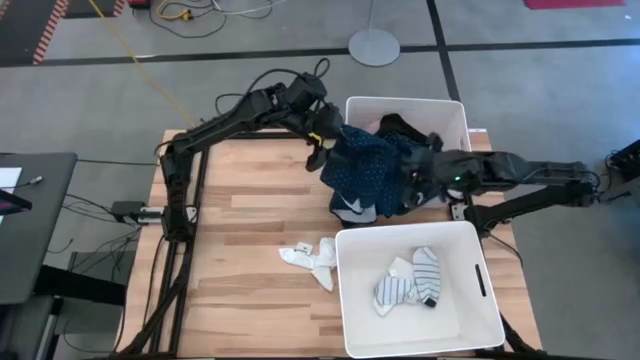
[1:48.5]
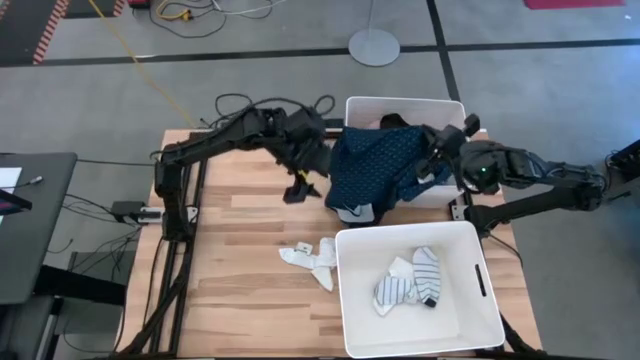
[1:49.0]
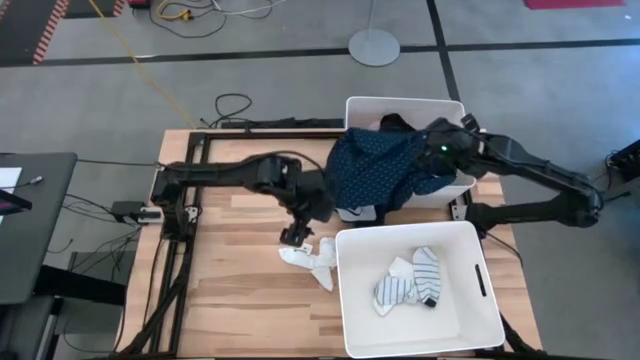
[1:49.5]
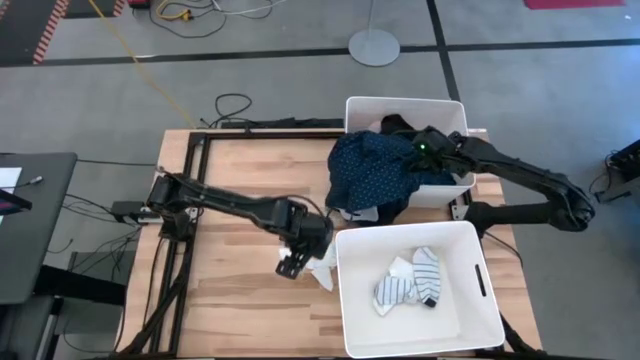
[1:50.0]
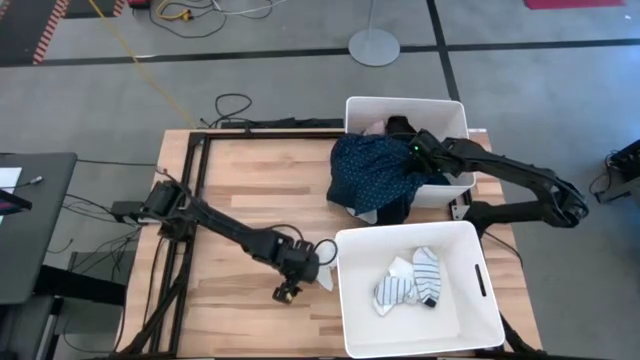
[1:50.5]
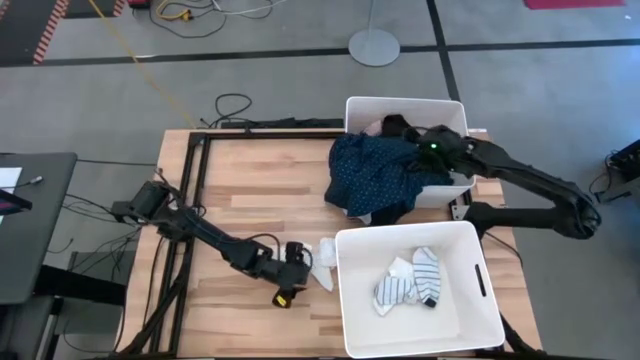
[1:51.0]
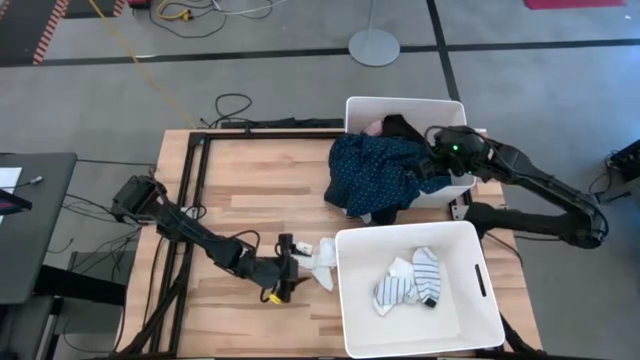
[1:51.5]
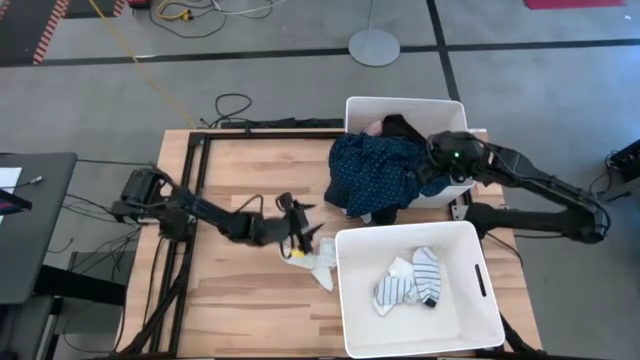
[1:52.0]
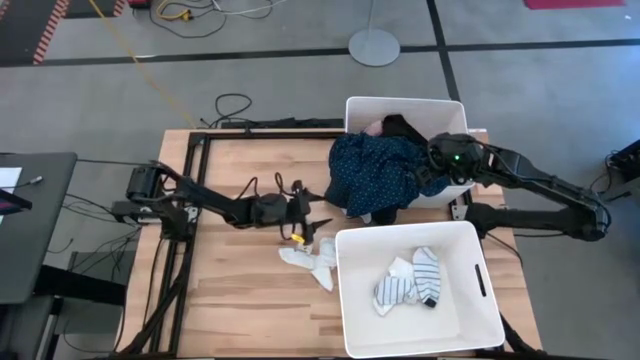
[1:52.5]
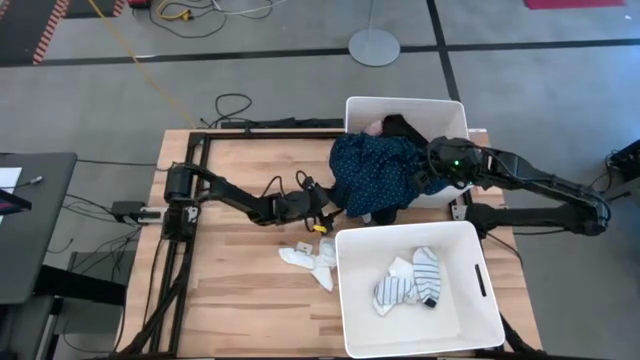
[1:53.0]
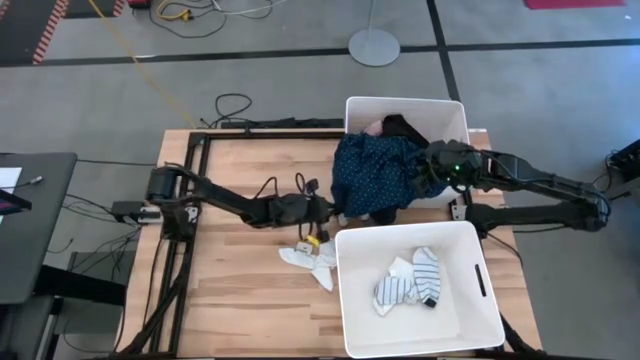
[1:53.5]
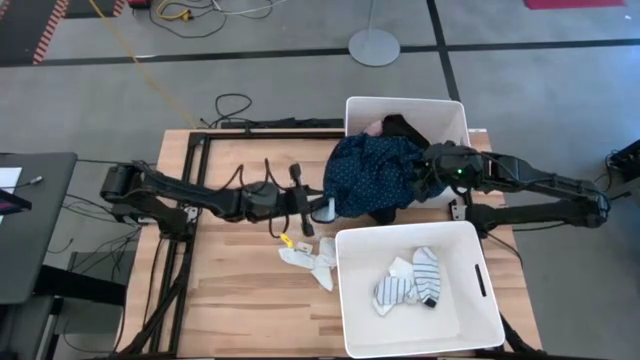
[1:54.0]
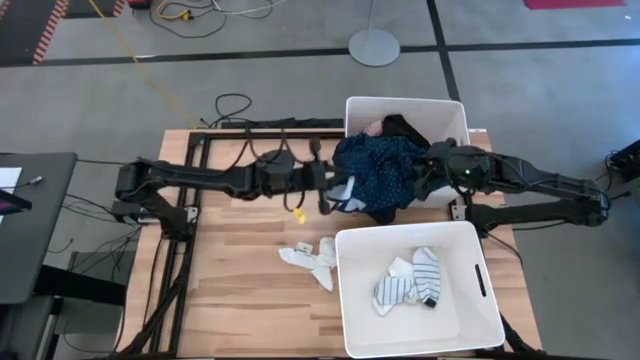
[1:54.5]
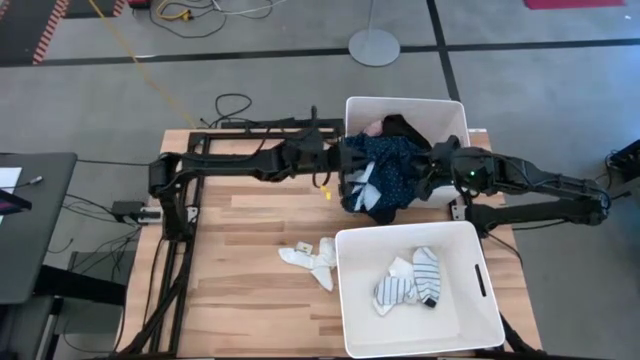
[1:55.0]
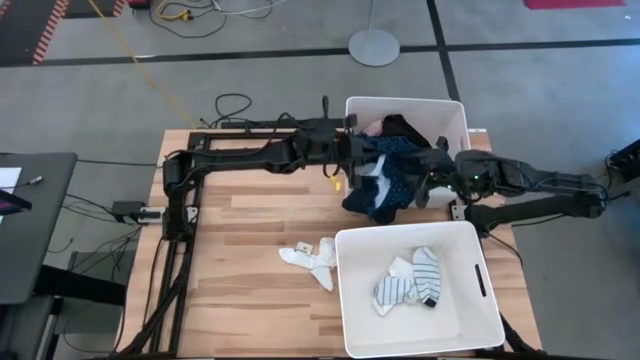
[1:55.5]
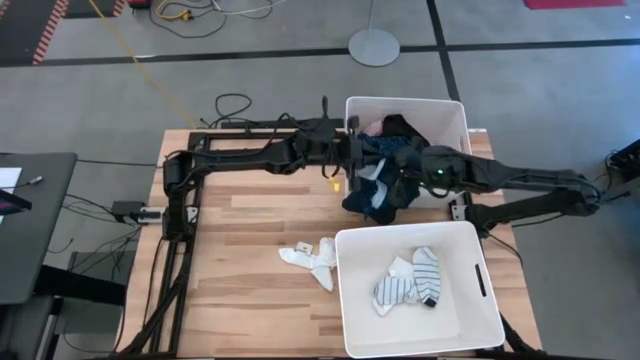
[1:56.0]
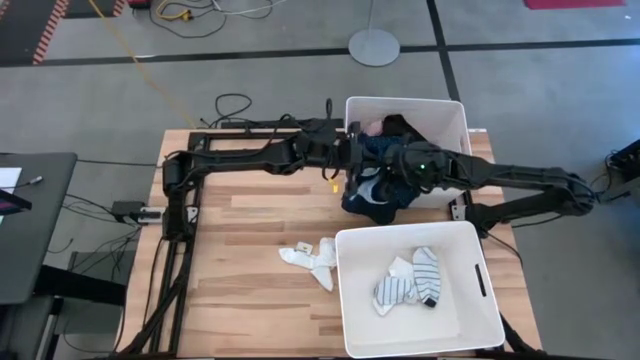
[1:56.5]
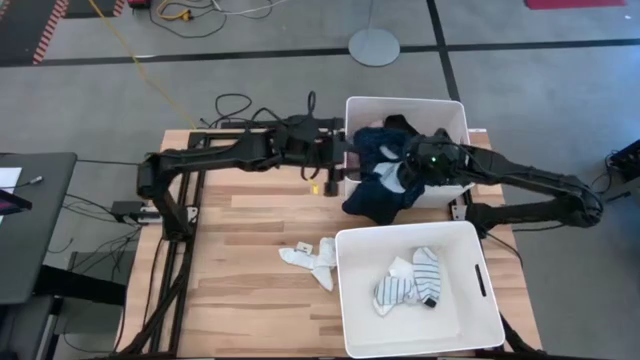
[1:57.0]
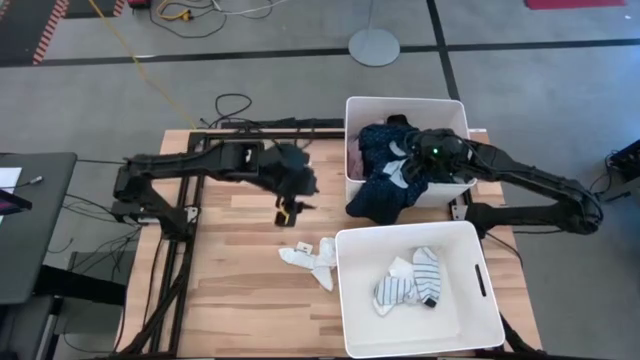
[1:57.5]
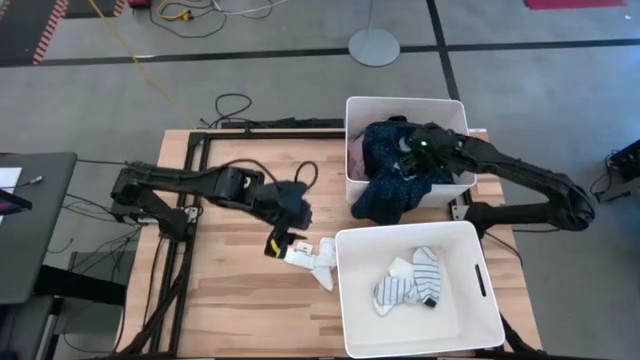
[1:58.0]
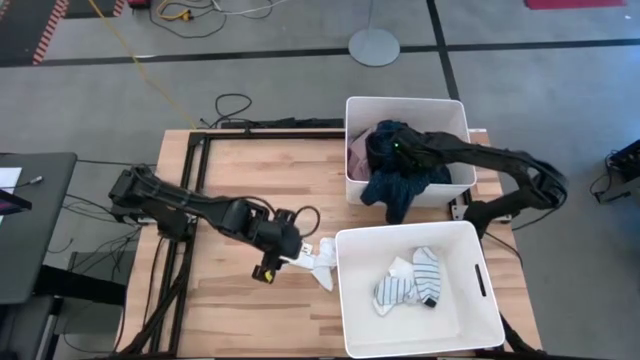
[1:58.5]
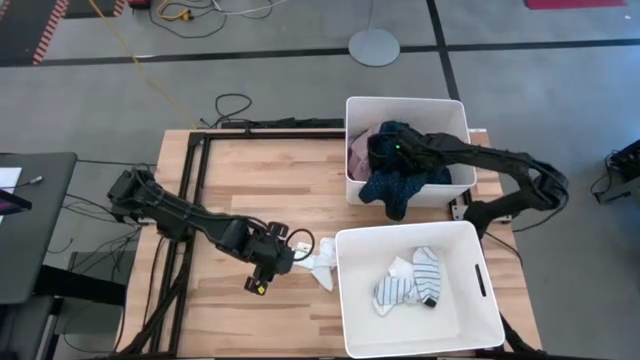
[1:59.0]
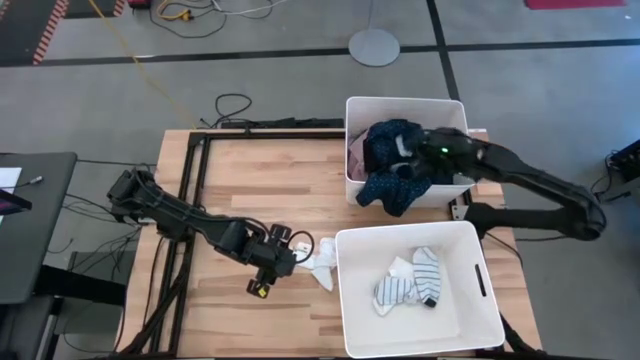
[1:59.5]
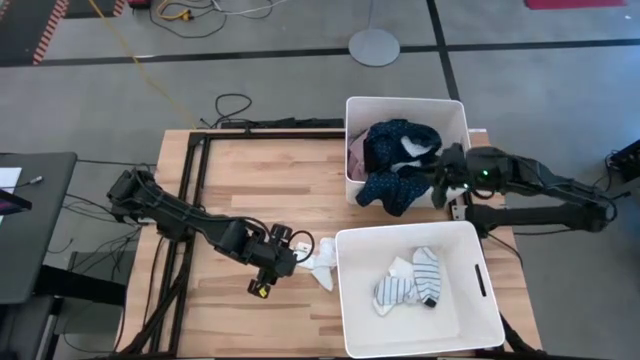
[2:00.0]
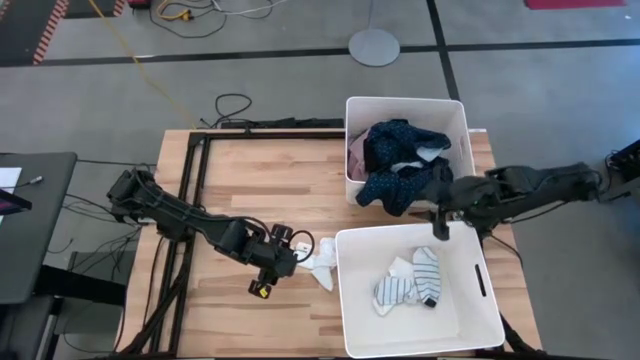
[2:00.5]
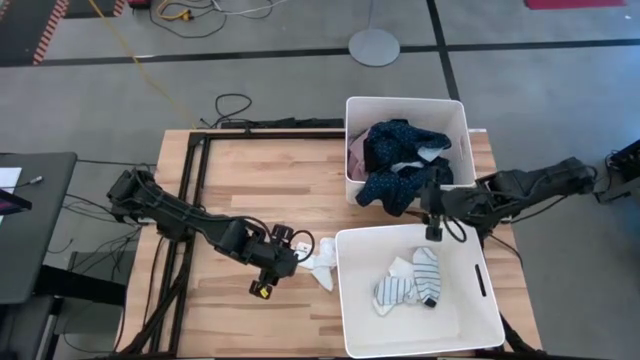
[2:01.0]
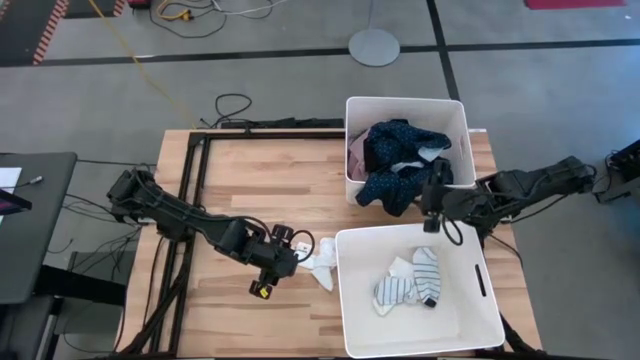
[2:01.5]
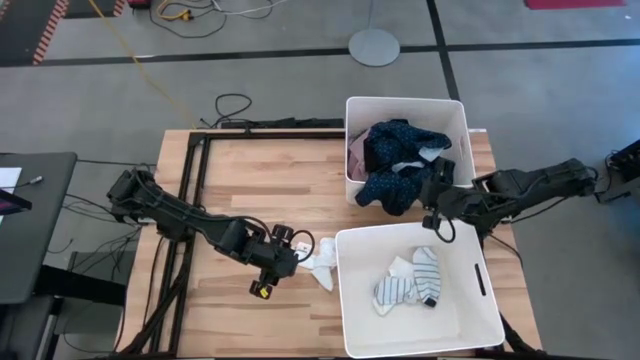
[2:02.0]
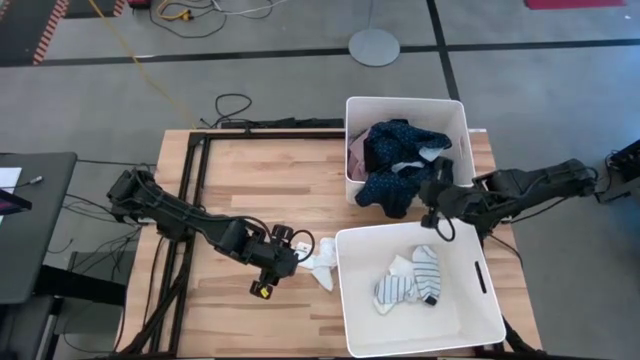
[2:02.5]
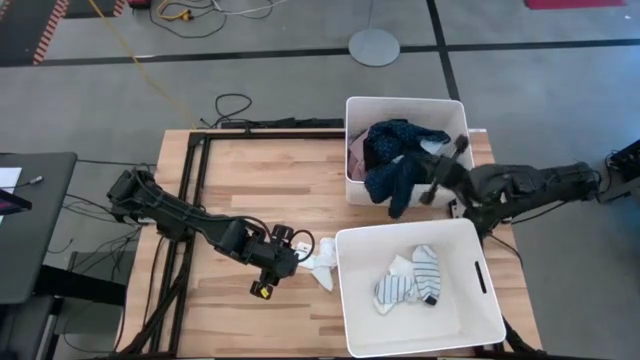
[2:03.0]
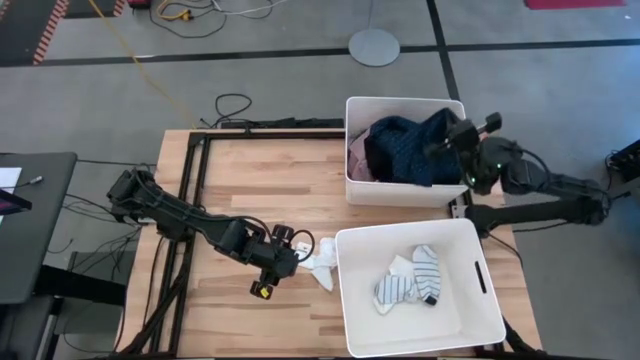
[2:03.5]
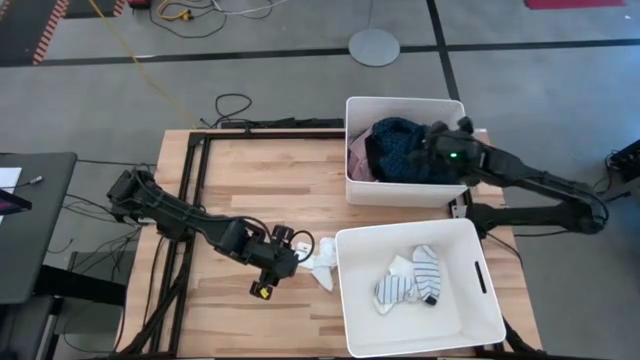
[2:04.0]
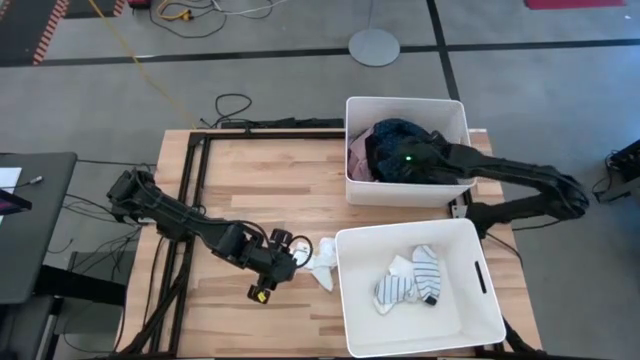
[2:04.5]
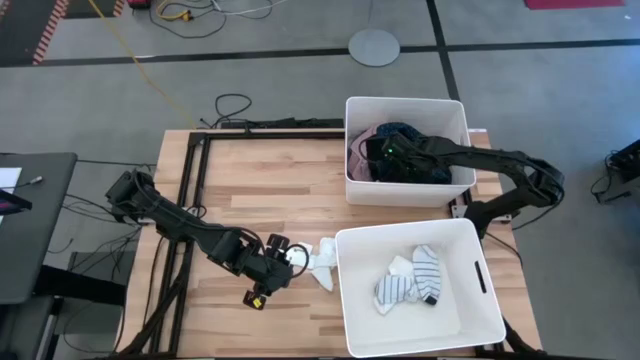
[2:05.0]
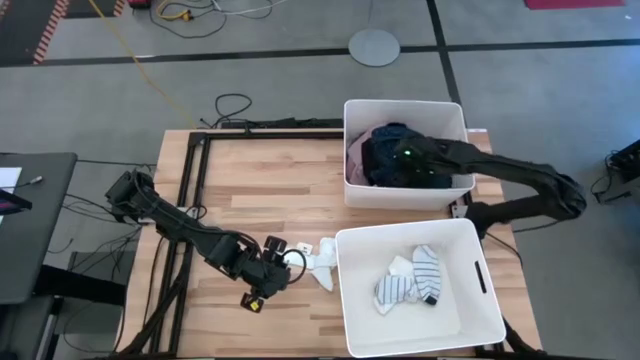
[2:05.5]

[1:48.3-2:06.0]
Task: Sort clothes
Put the blue polo shirt into the top white laundry bin

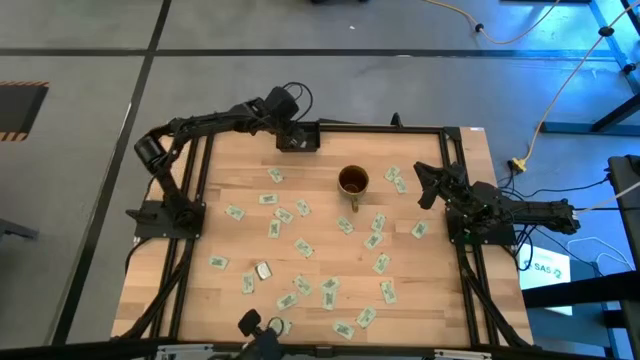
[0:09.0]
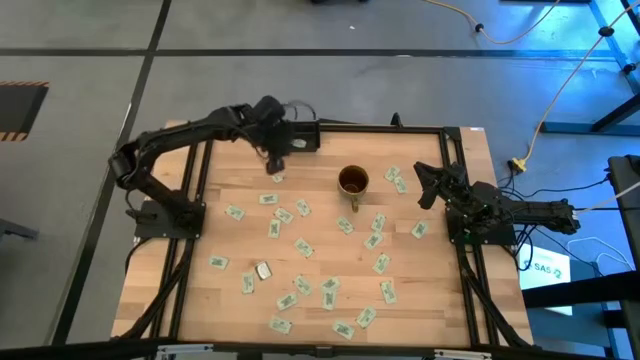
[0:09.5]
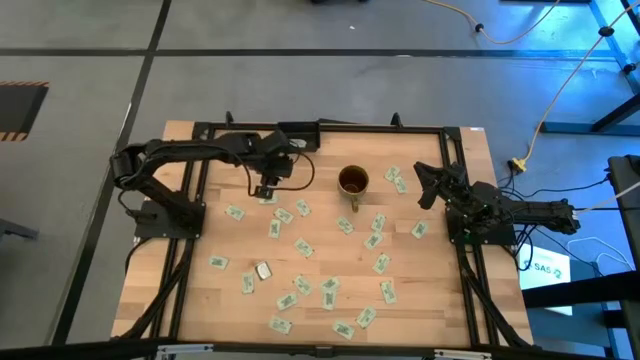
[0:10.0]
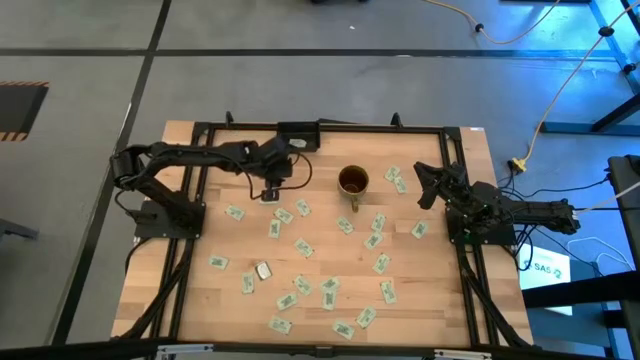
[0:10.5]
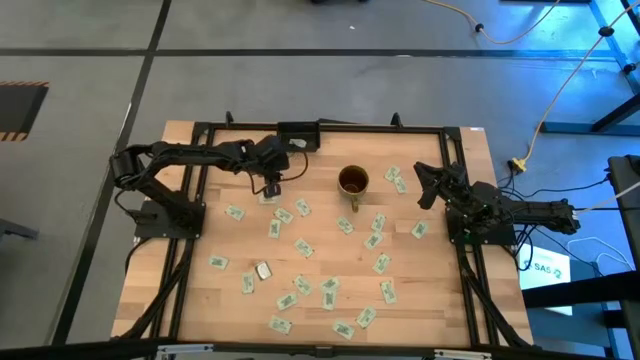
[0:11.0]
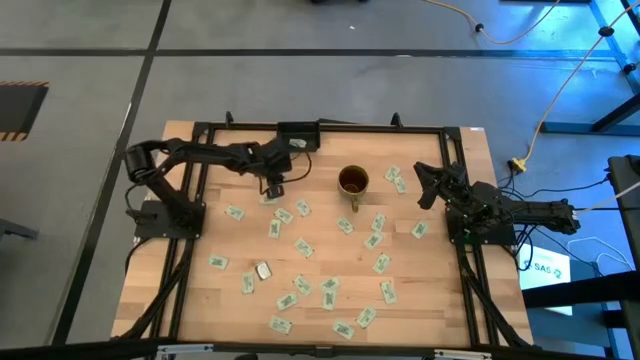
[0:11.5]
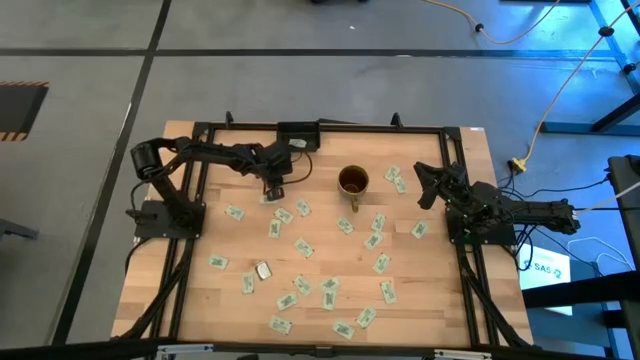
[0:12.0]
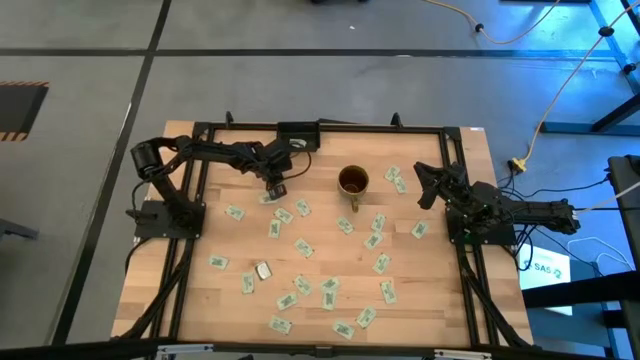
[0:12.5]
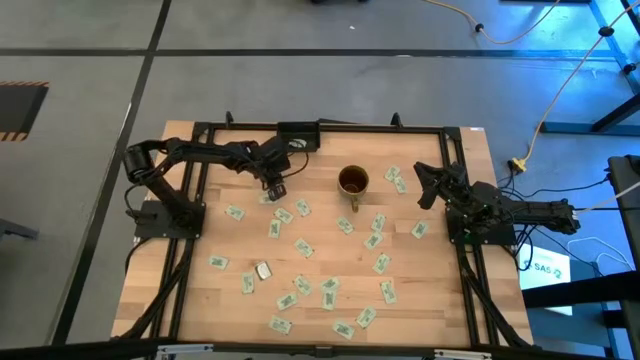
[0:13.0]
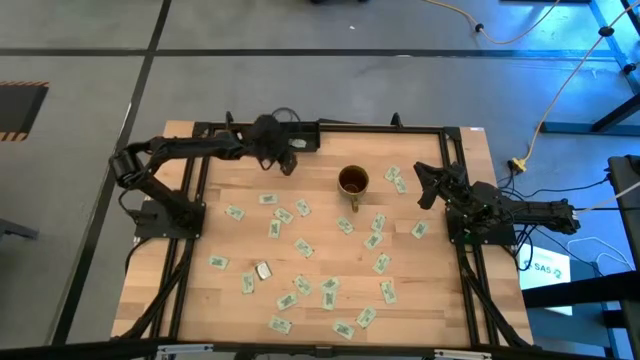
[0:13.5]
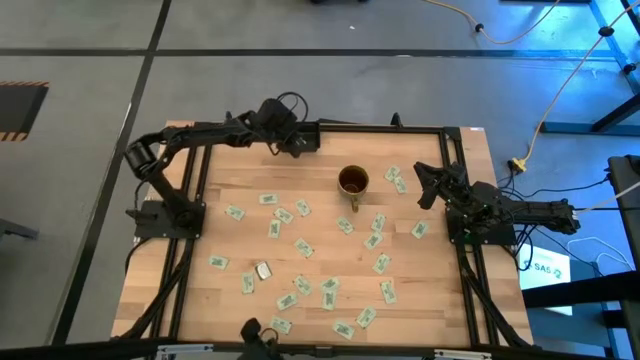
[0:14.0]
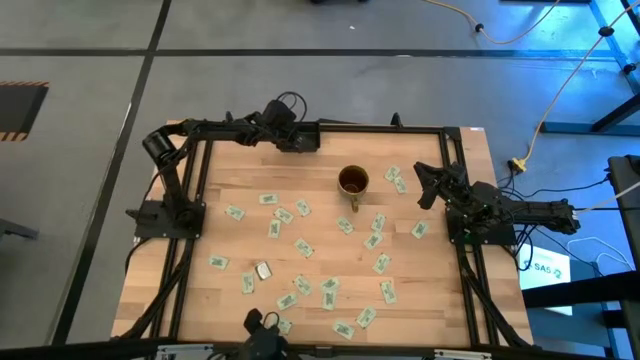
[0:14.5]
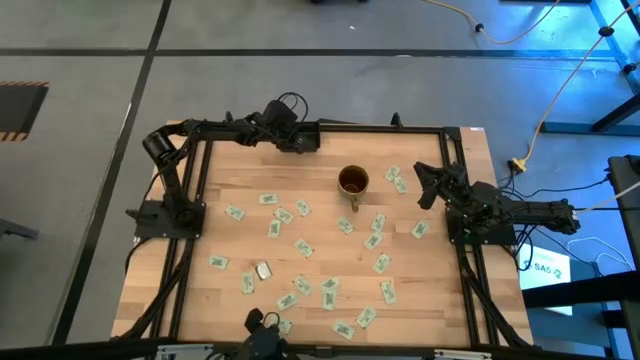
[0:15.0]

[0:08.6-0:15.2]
Task: Pick and place Stevia / Truvia into bins
Put the stevia packet into the black container
